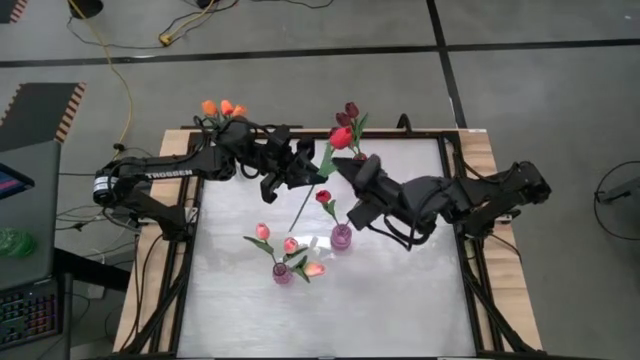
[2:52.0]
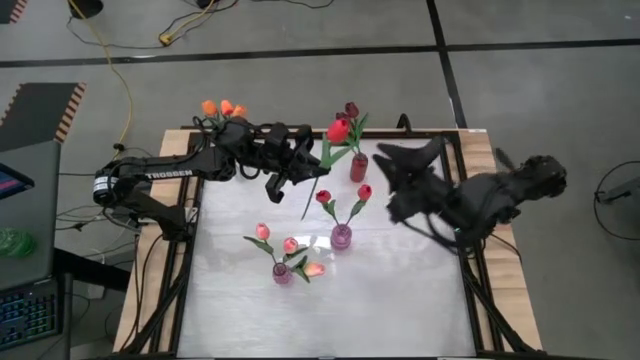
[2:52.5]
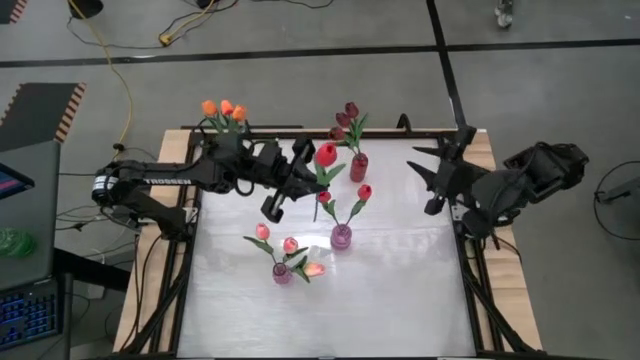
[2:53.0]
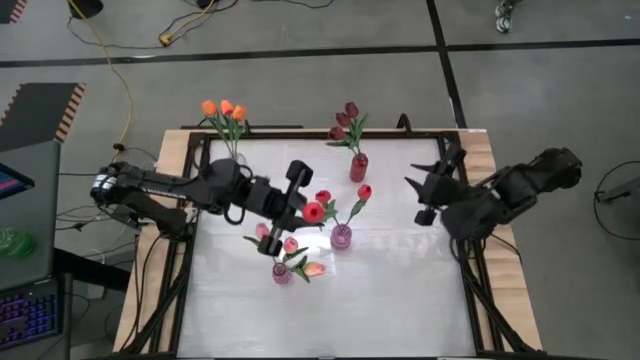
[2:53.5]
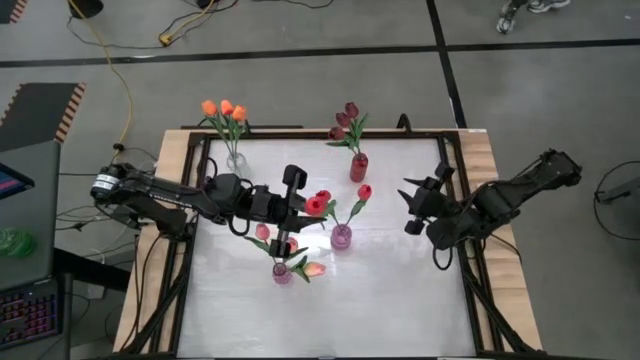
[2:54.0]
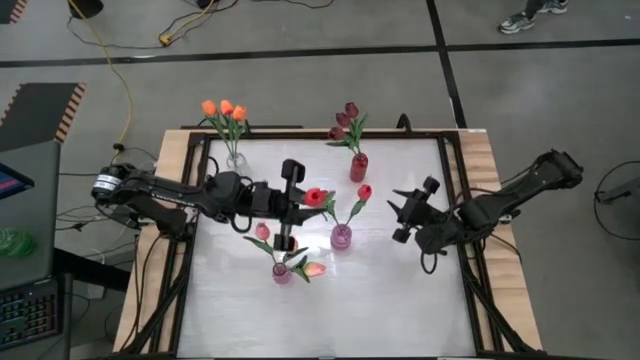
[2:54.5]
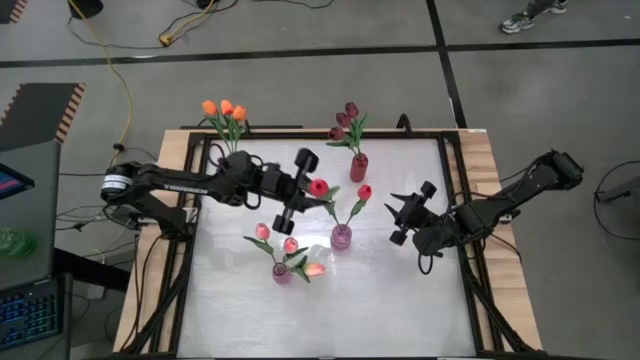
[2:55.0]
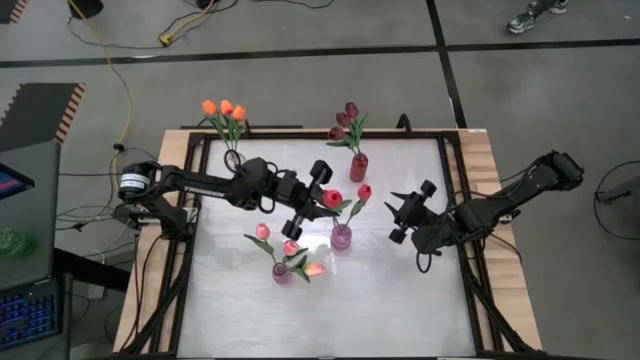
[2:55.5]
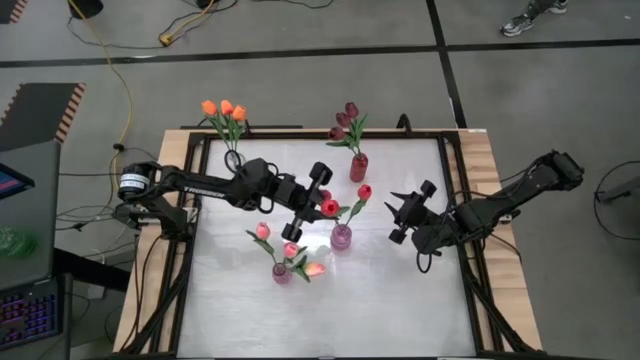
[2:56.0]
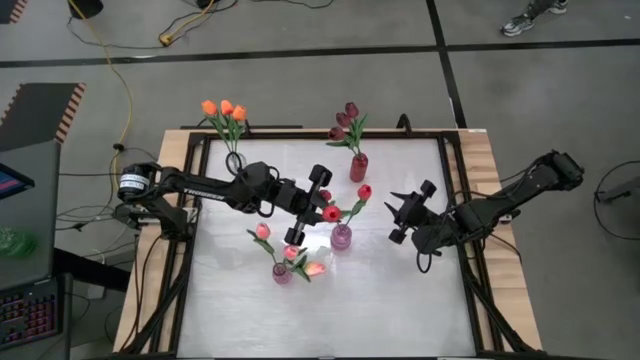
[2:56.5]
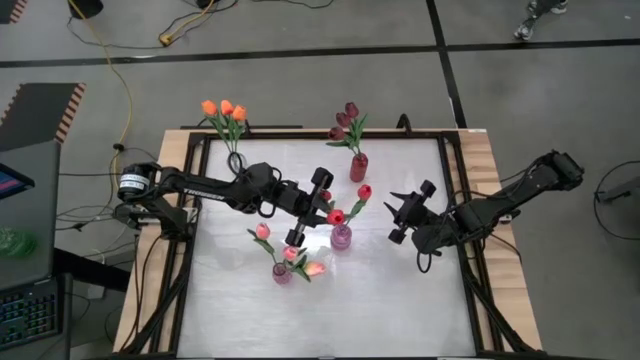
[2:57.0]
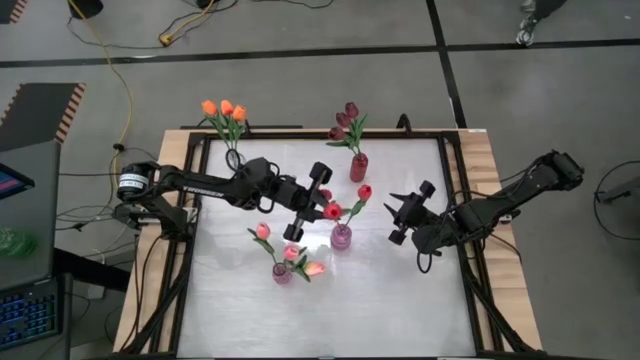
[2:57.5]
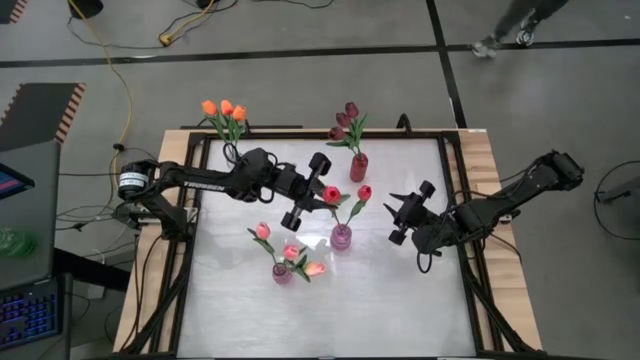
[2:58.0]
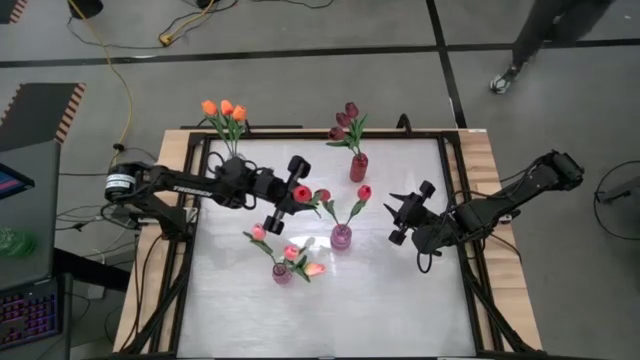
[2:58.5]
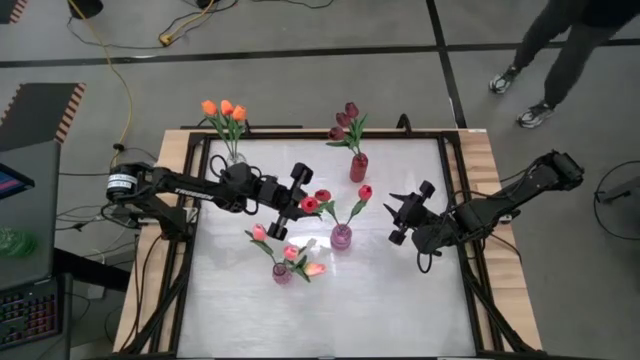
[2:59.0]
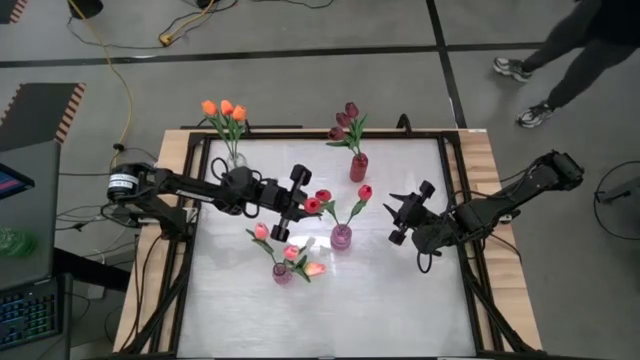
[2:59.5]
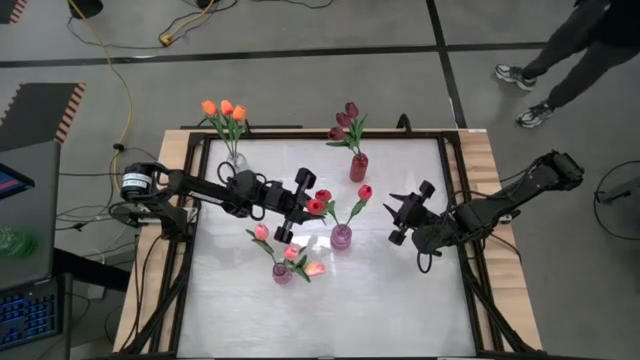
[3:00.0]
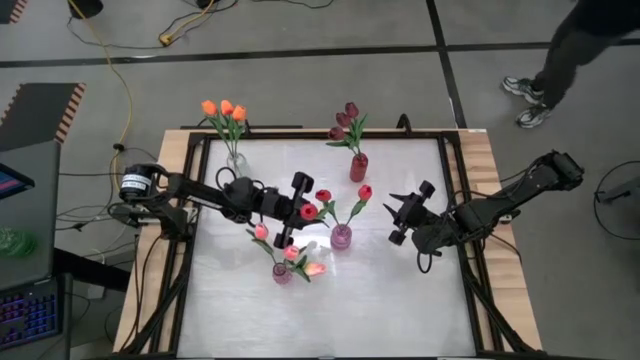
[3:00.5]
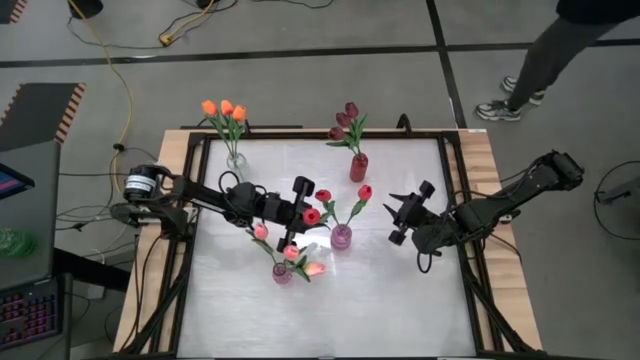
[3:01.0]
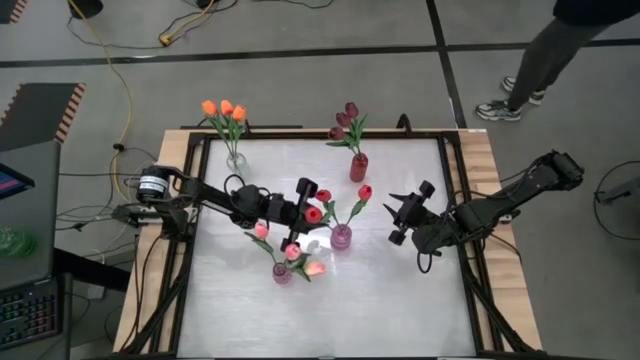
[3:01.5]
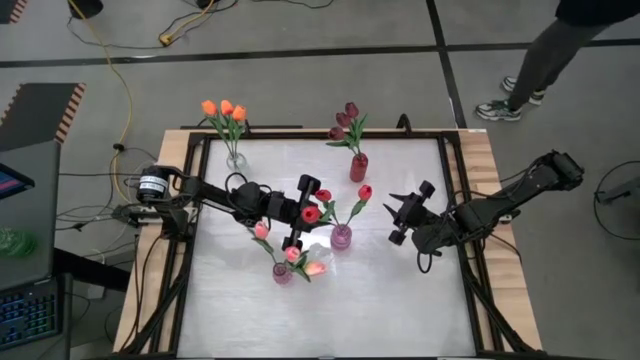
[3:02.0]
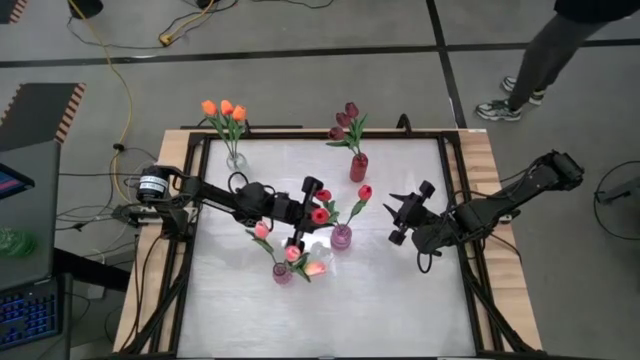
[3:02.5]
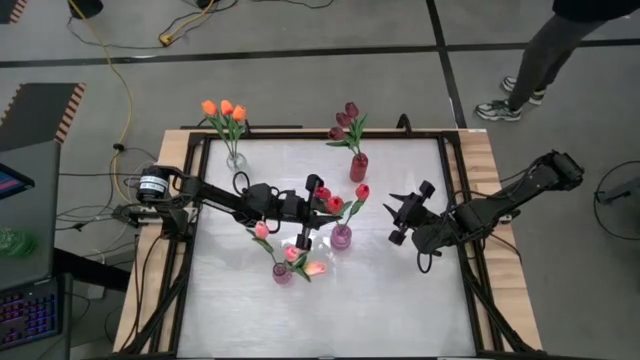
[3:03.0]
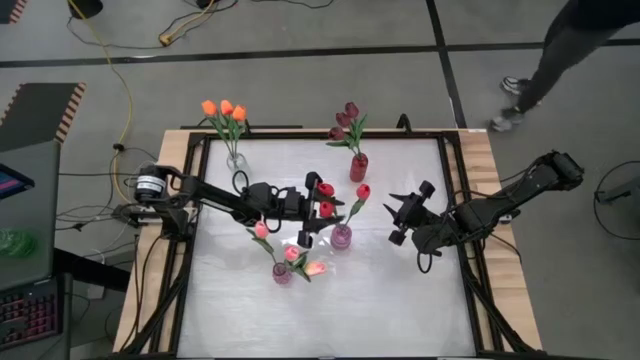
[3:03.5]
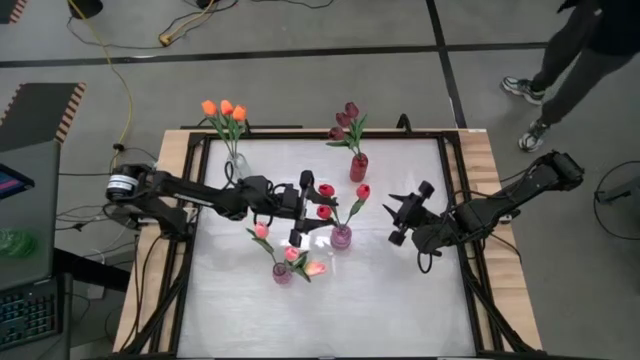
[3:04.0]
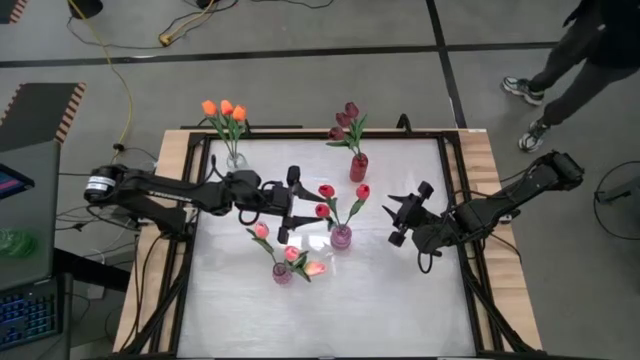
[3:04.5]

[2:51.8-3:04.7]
Task: Sort flowers into vase by color
Put the red flower into the top purple vase

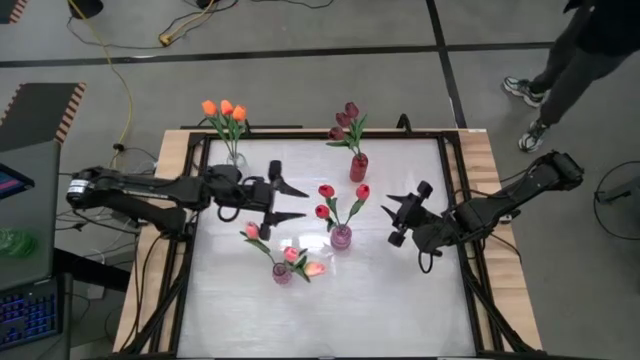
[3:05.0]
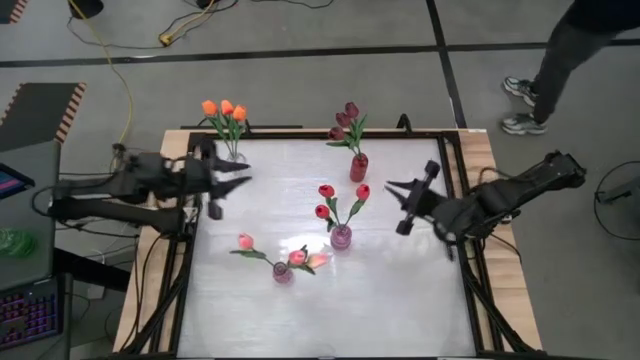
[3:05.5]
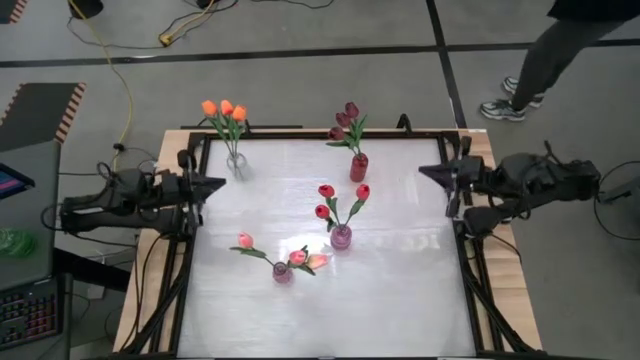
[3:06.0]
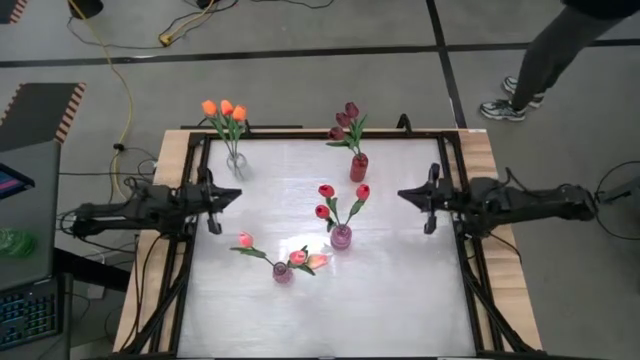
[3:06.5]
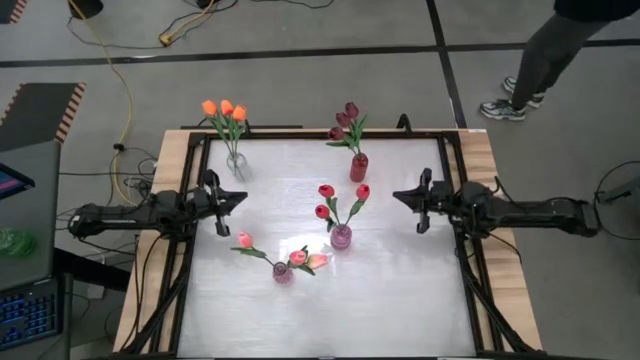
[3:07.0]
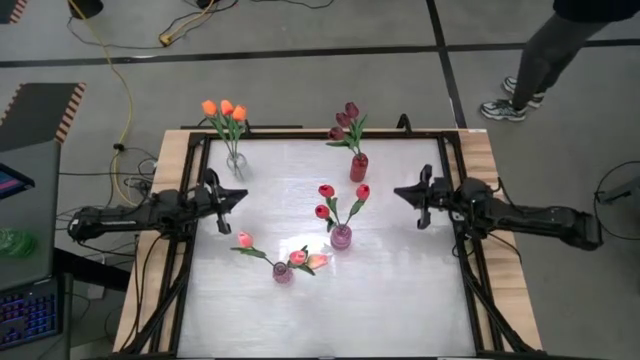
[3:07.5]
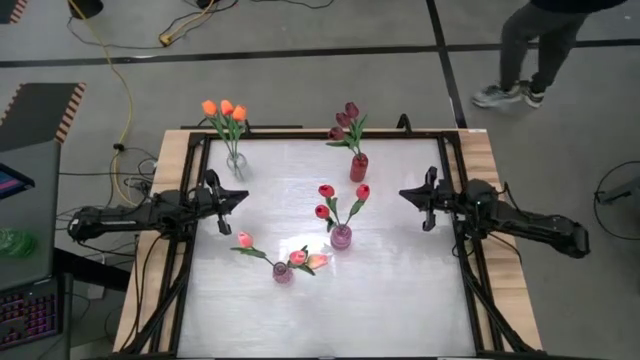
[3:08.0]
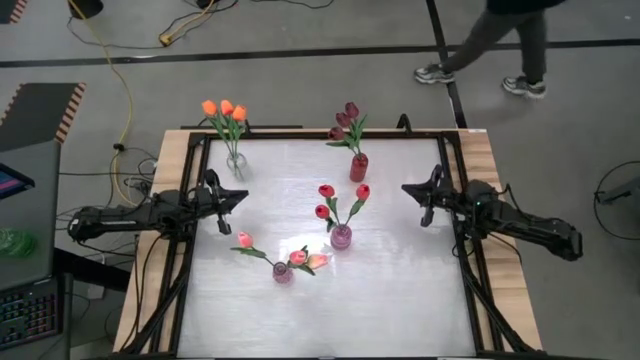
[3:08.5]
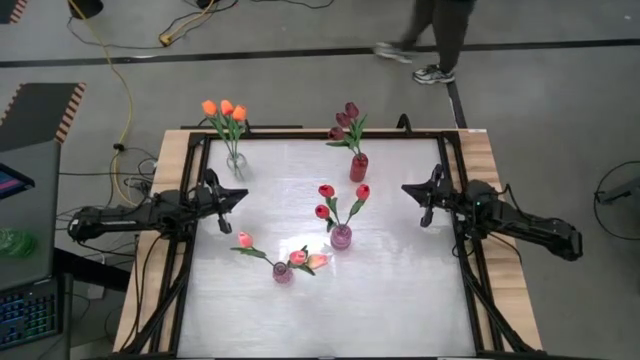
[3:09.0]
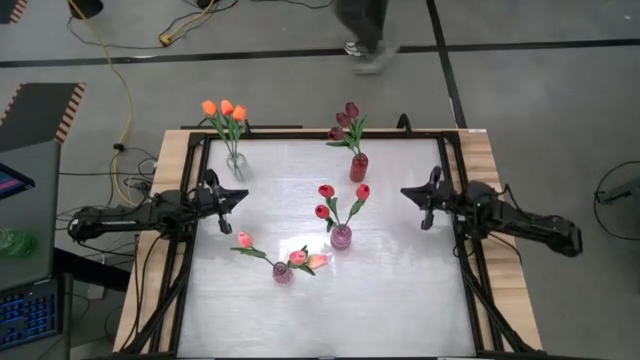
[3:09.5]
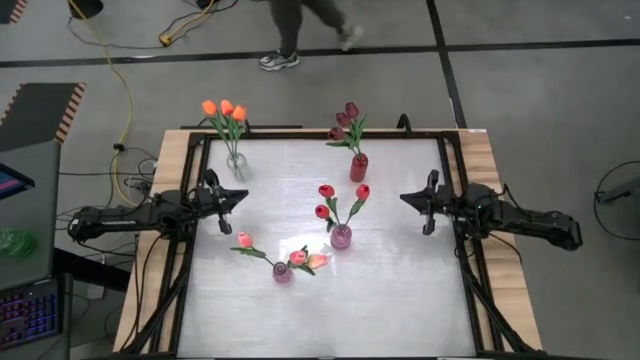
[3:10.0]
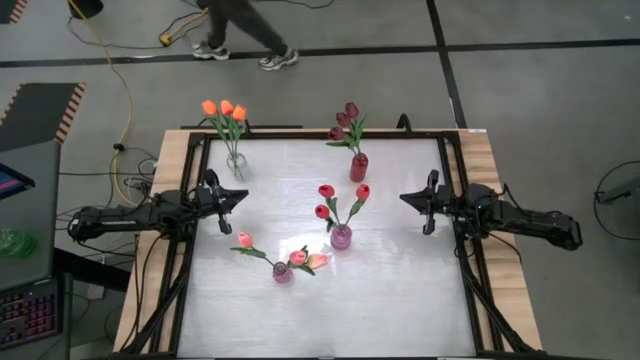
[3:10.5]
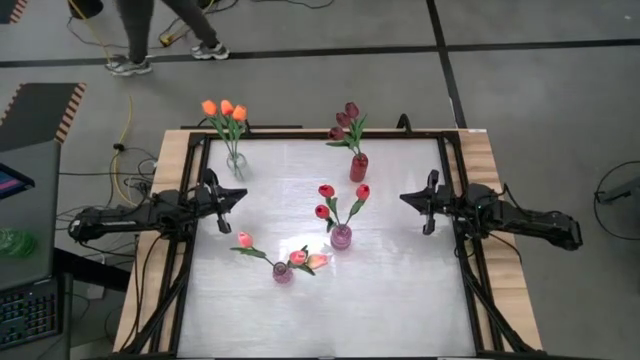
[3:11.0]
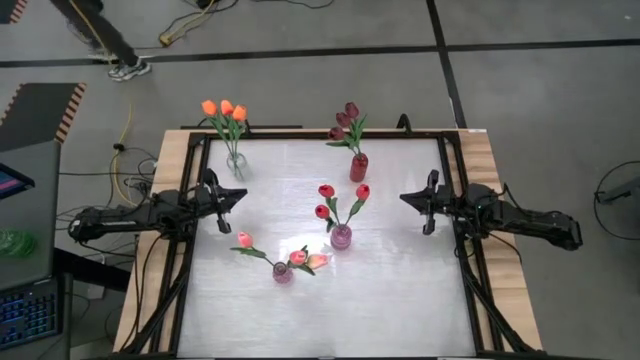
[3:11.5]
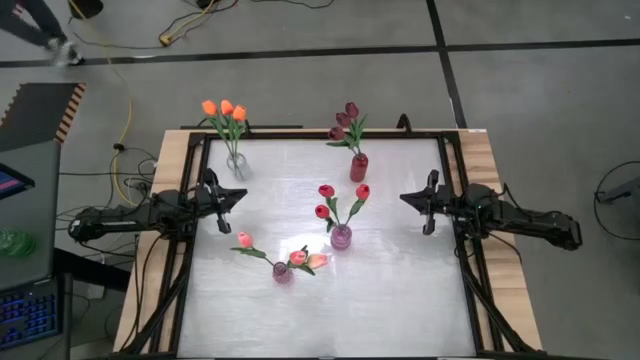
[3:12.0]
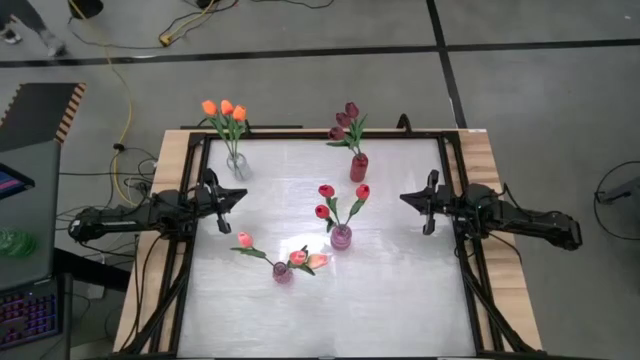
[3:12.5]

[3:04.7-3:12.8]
Return to Home Position
